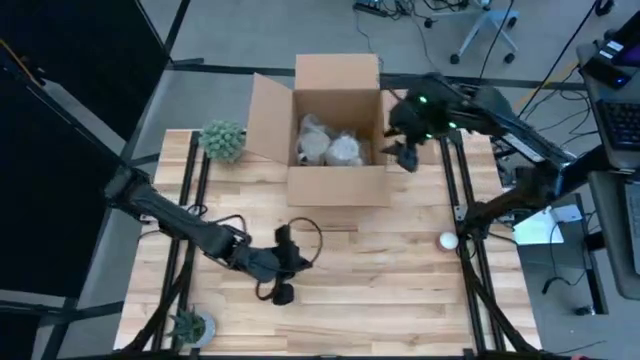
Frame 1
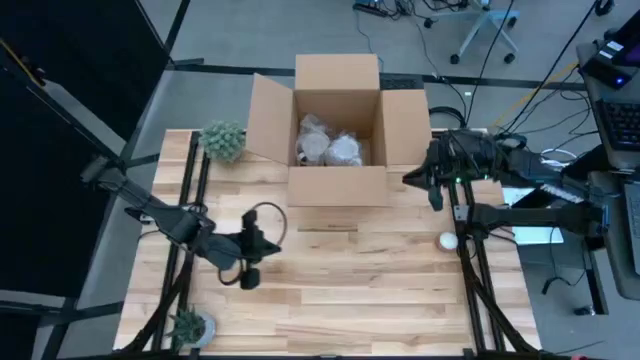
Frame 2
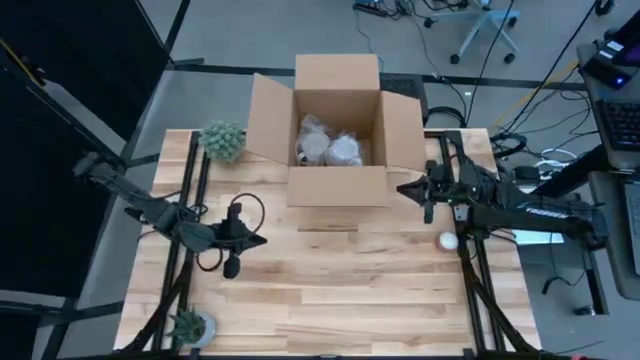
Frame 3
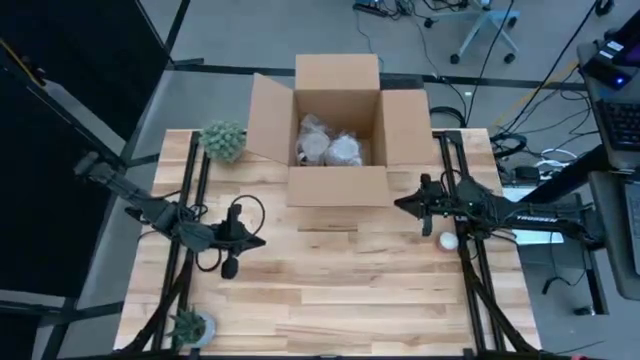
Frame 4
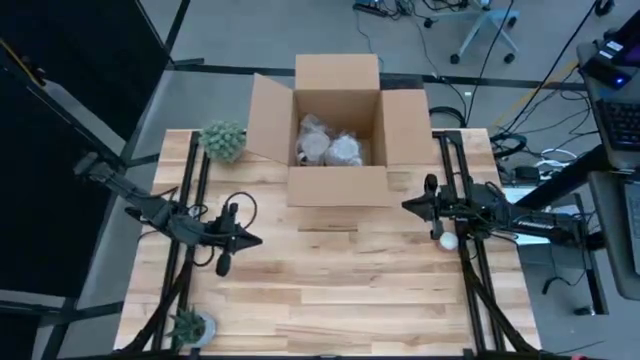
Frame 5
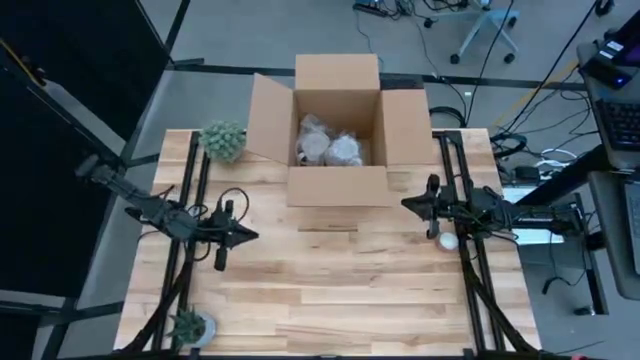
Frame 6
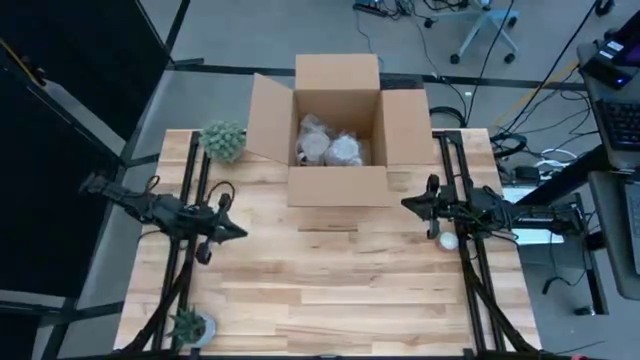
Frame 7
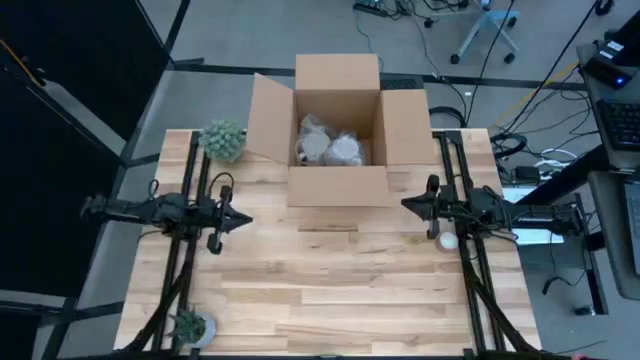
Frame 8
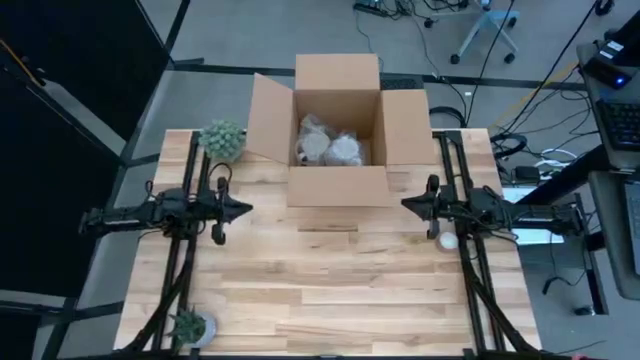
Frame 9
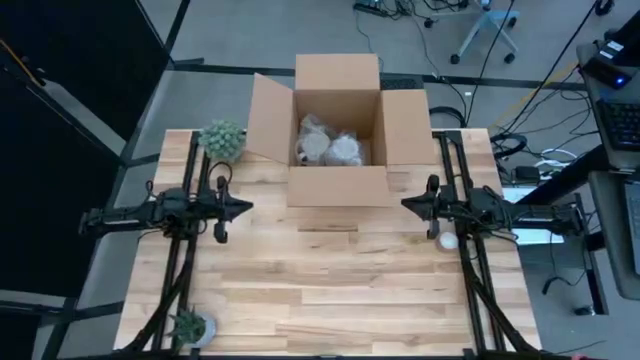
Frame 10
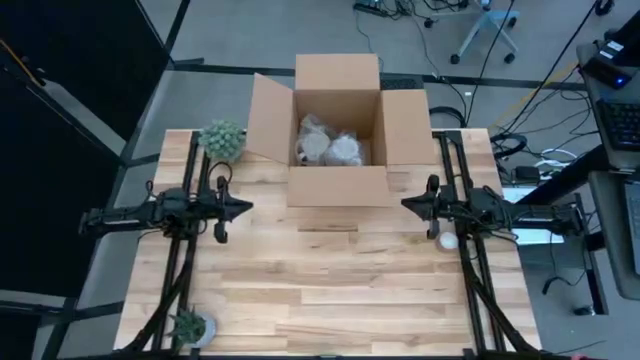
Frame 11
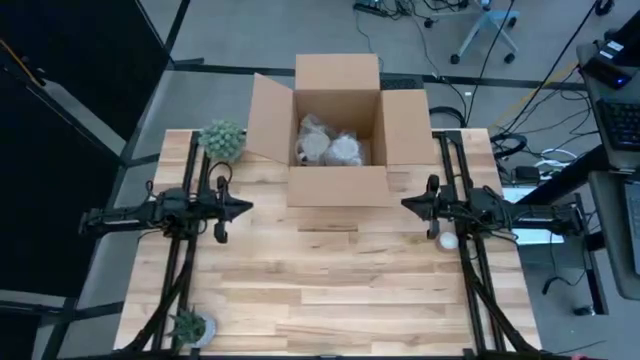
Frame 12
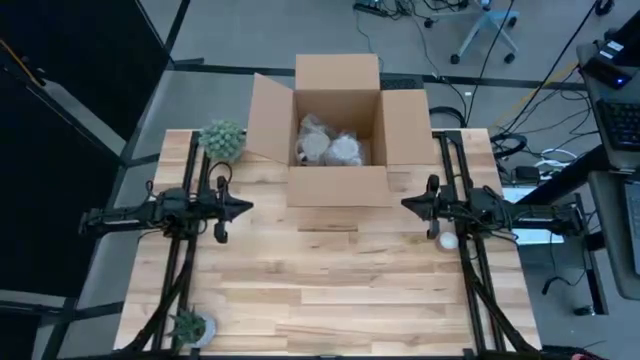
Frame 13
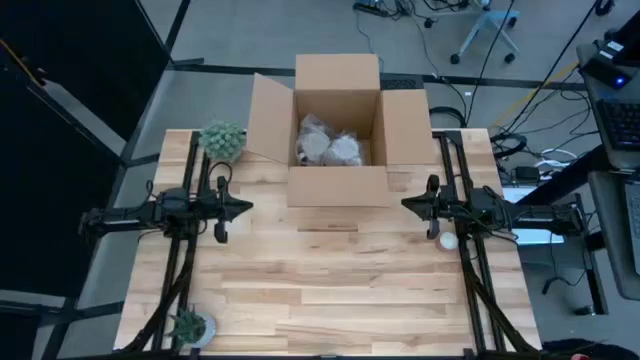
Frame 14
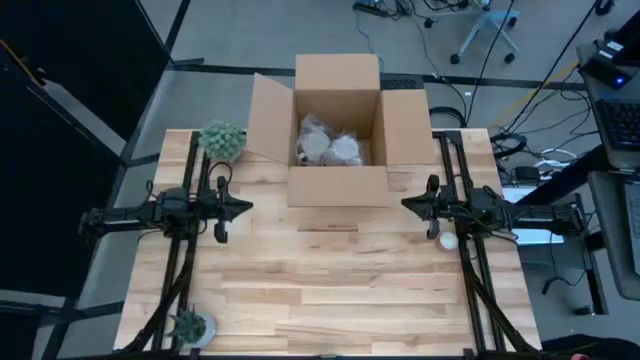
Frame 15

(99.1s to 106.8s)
Task: wrap mug
Return to Home Position

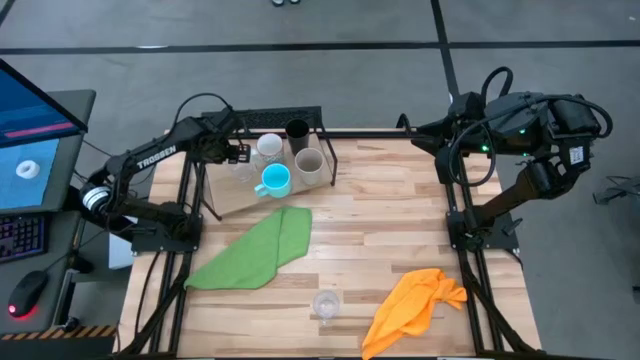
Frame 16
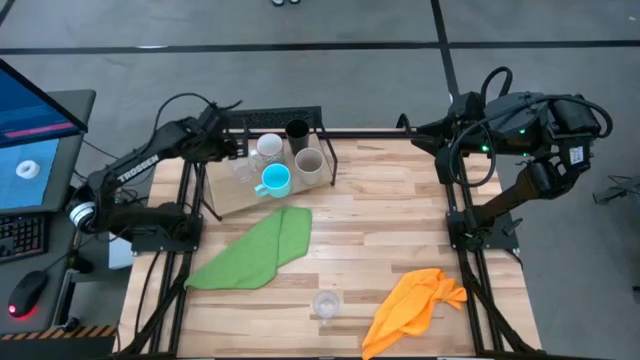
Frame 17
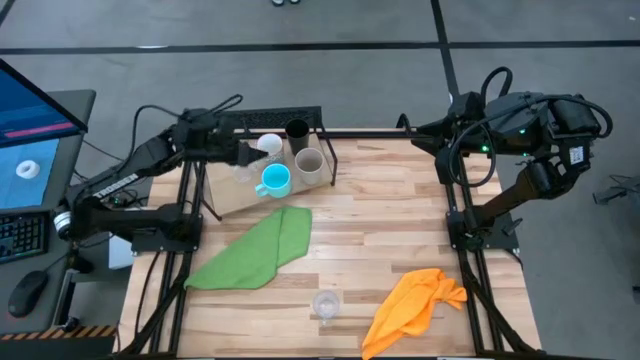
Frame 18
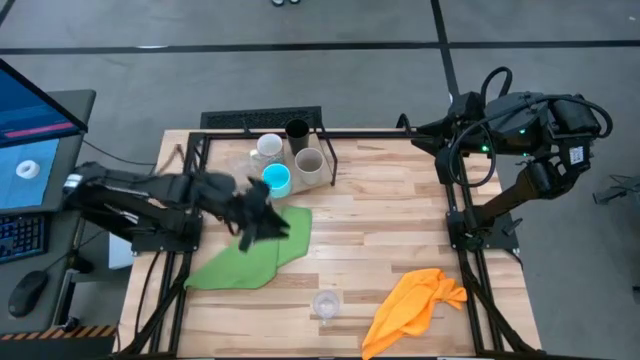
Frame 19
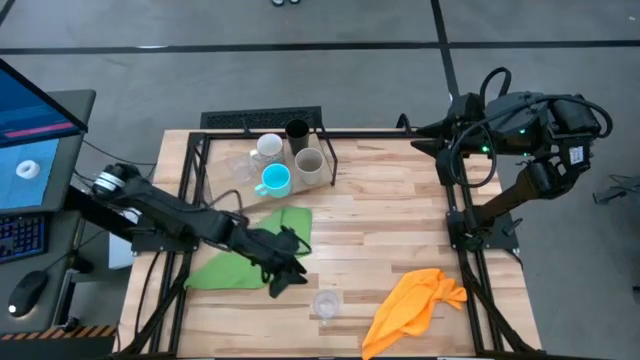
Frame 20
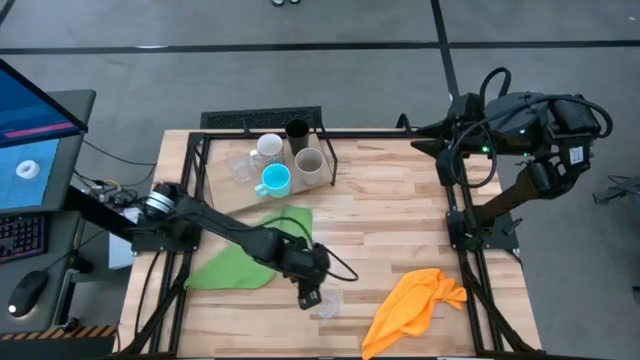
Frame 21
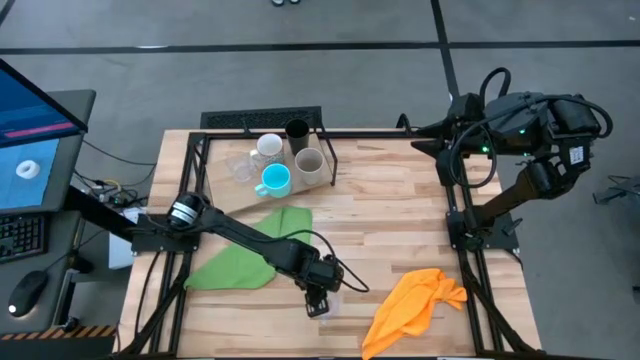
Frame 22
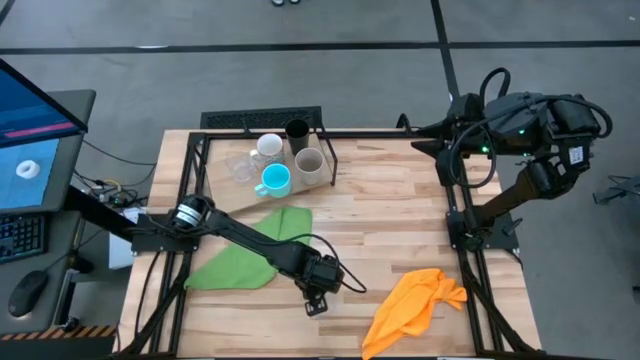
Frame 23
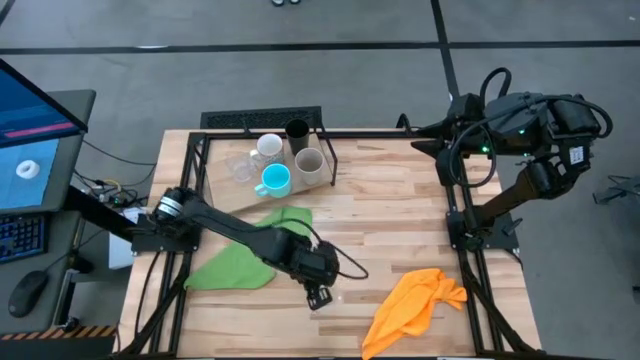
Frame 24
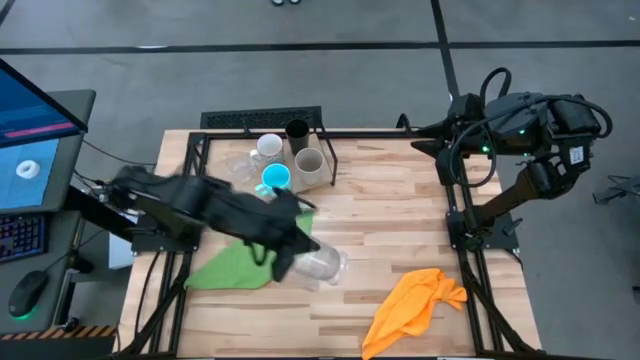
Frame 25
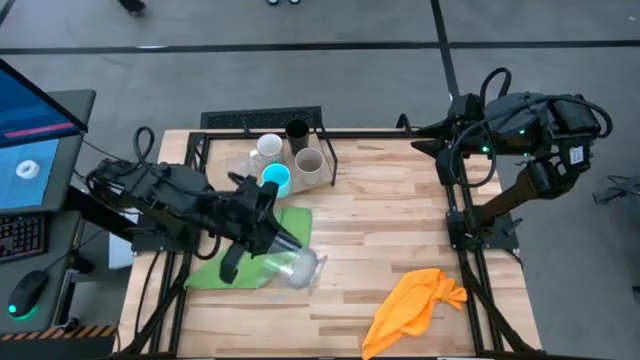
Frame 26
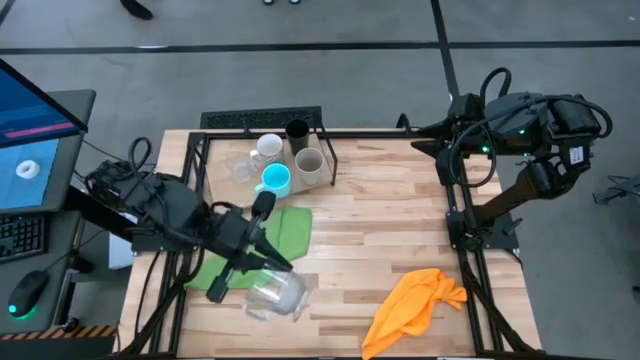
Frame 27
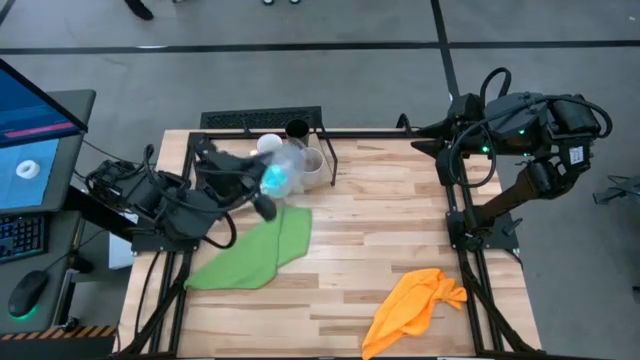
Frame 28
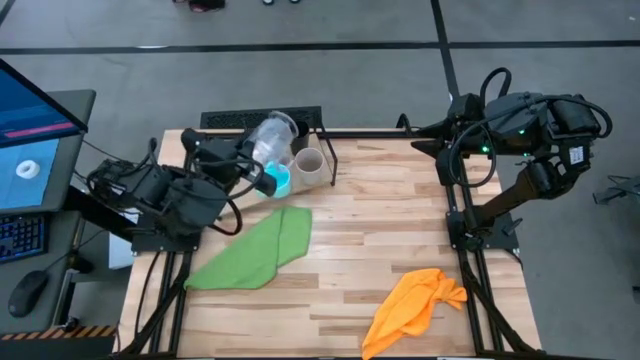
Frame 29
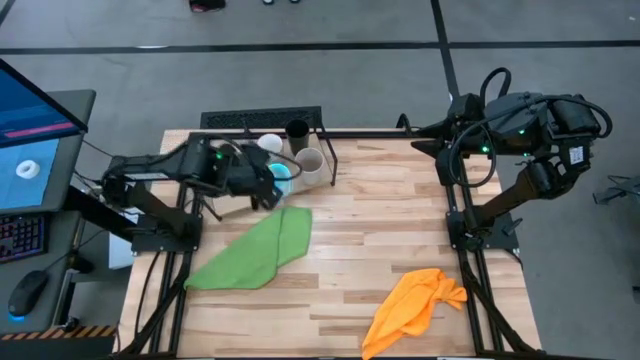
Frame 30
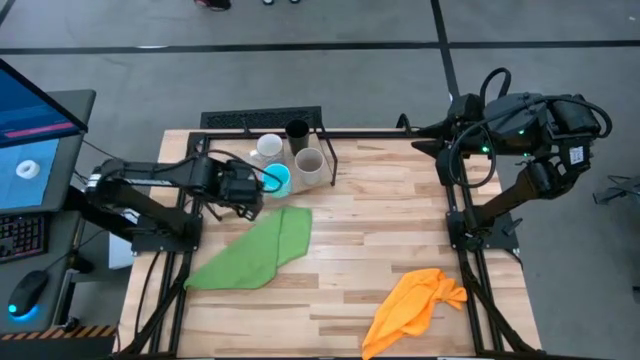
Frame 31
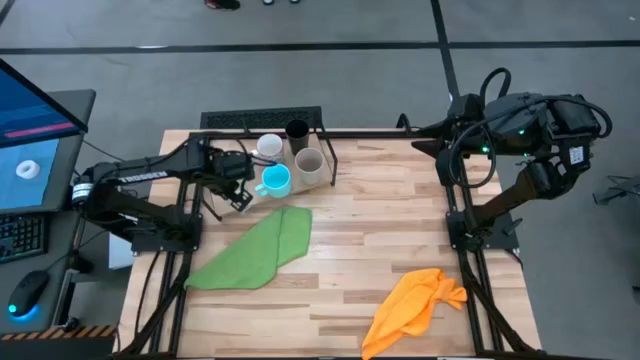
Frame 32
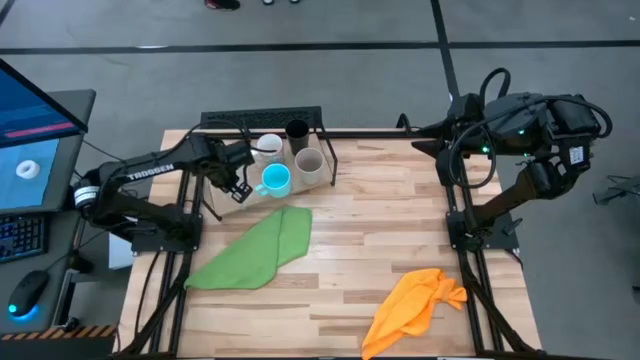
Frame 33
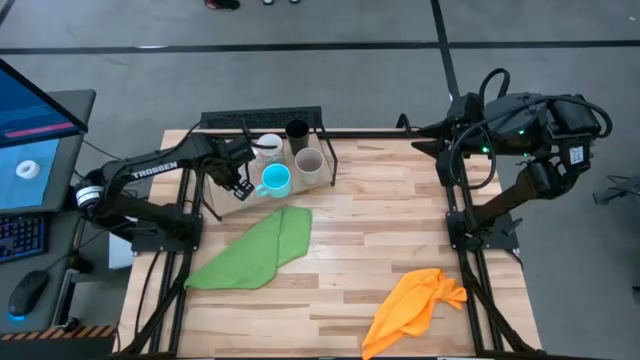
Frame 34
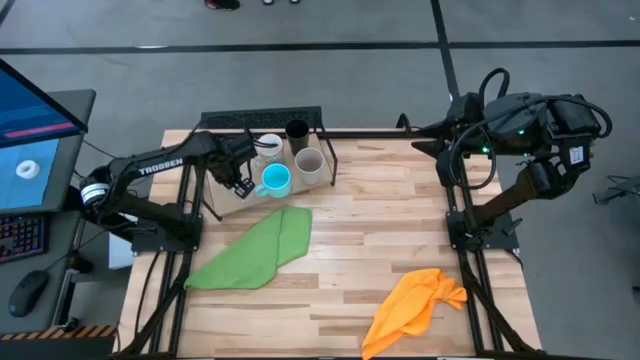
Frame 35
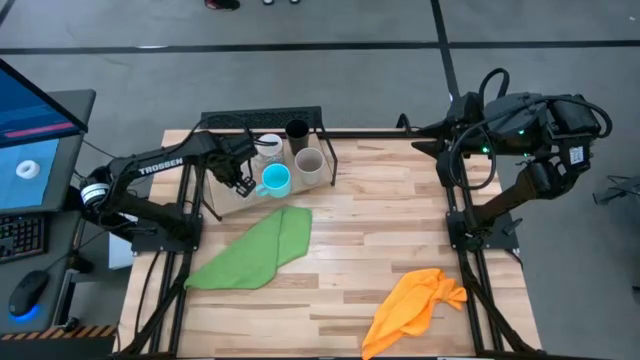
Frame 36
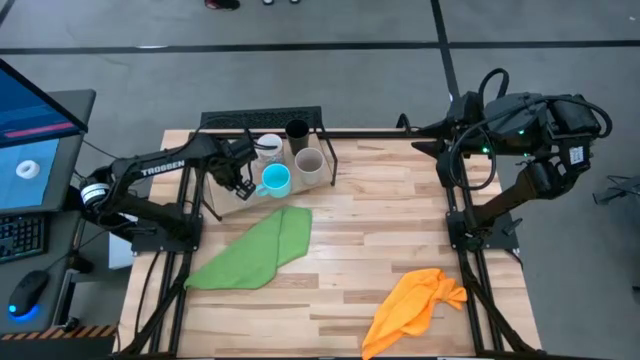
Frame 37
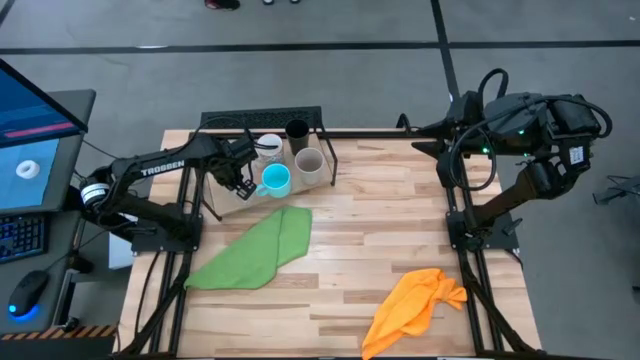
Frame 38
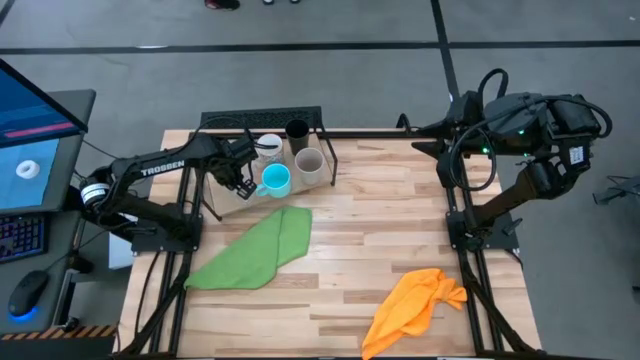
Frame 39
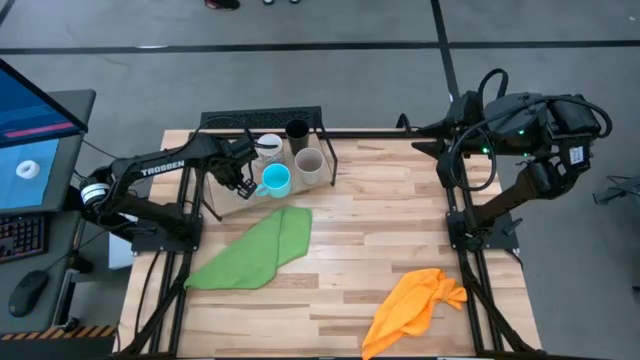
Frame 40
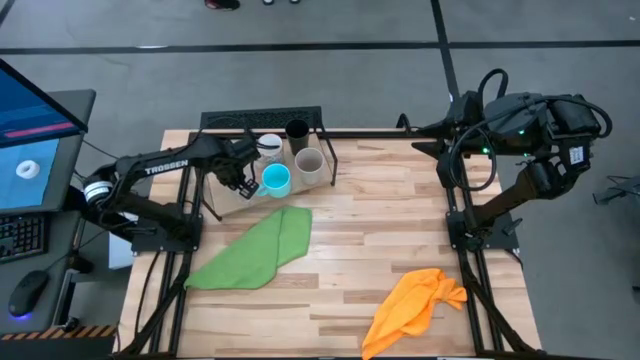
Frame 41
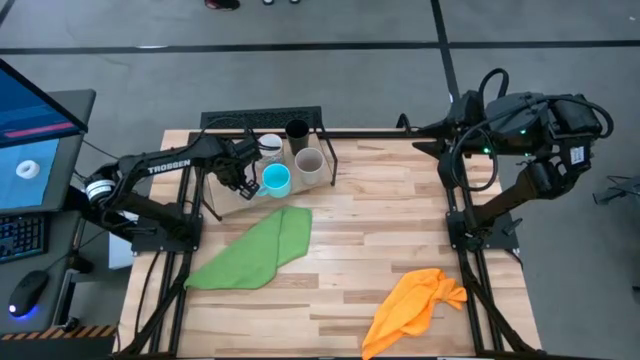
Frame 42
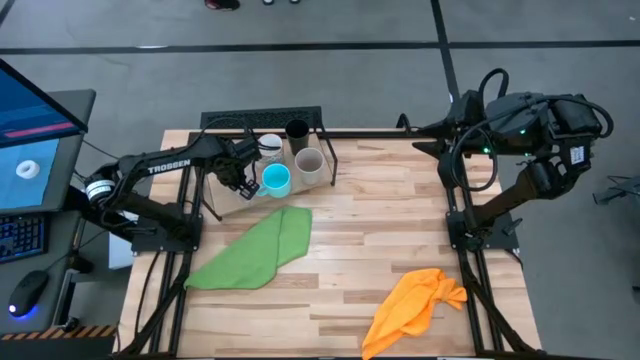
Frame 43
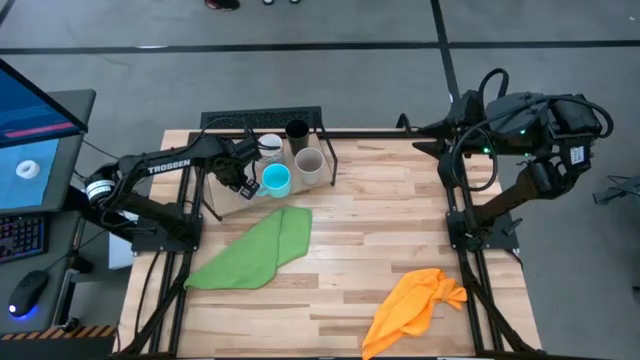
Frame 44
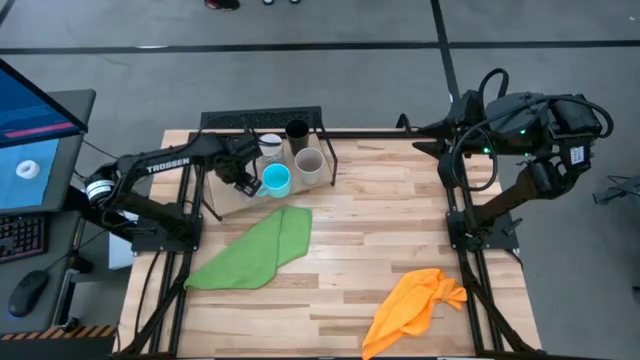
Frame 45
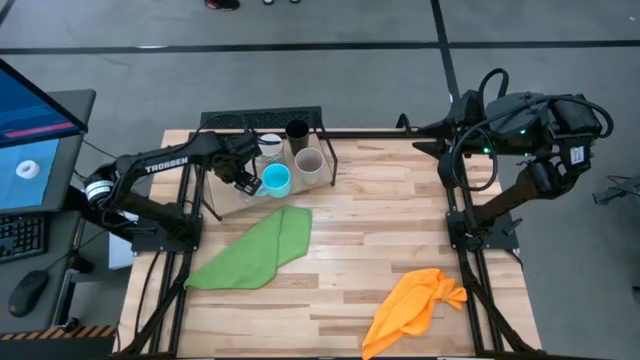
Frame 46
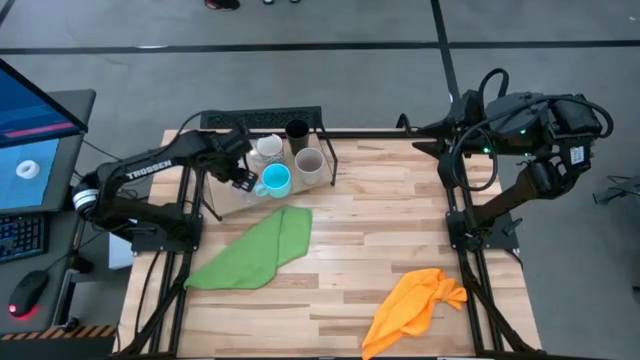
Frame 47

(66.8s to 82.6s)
Task: Stack small to large cups/mugs on shelf
Put the transparent mug on the shelf
